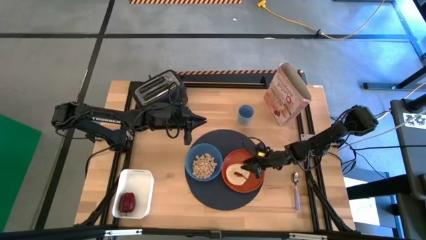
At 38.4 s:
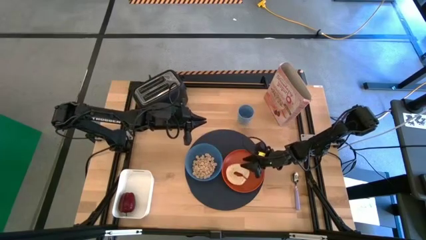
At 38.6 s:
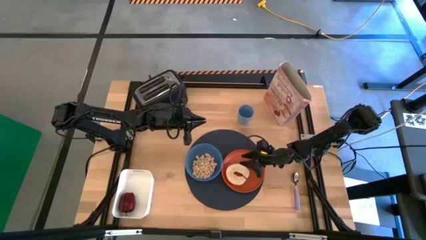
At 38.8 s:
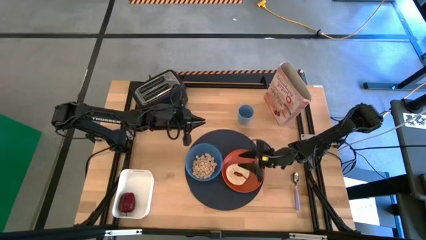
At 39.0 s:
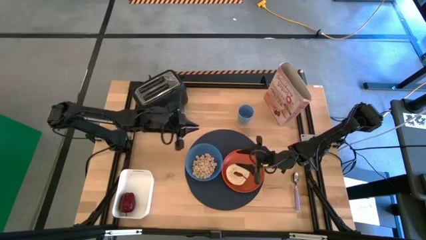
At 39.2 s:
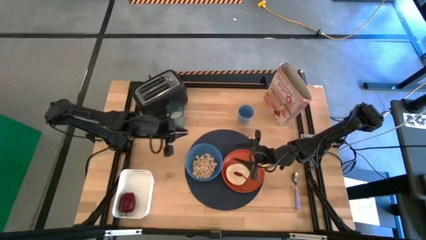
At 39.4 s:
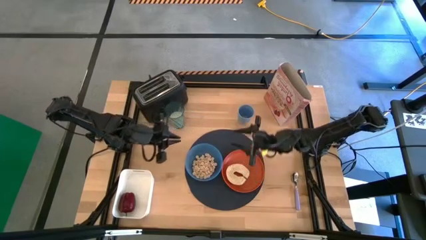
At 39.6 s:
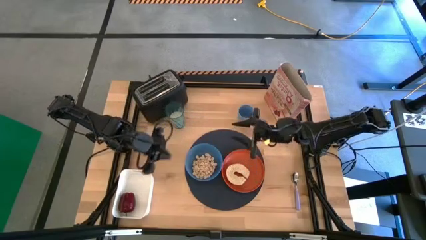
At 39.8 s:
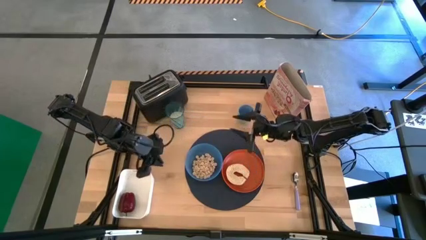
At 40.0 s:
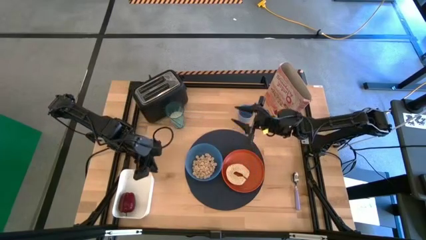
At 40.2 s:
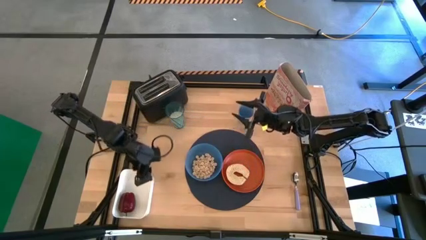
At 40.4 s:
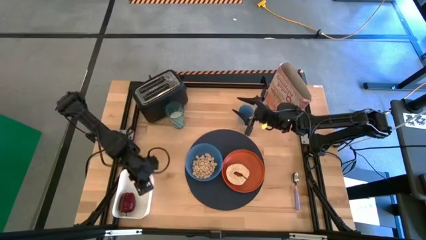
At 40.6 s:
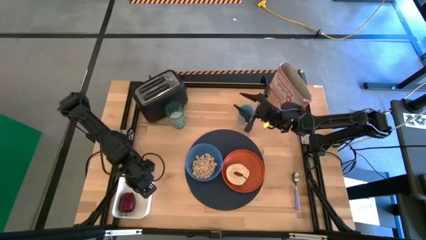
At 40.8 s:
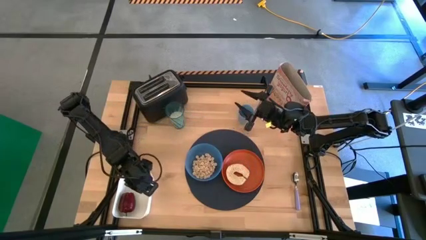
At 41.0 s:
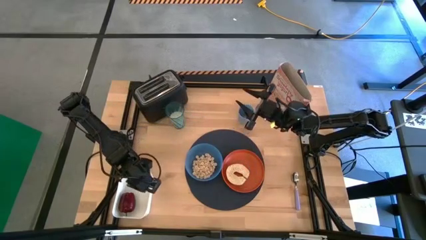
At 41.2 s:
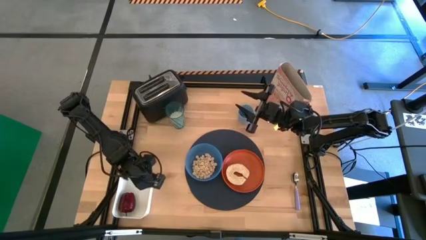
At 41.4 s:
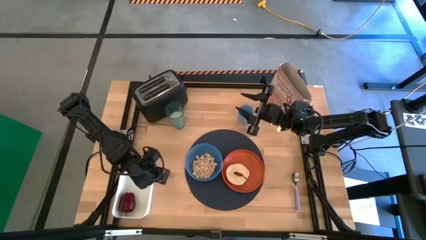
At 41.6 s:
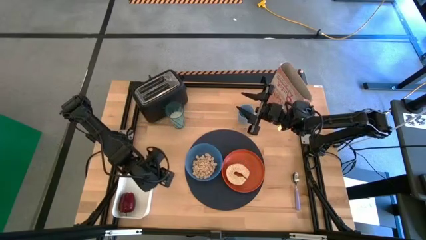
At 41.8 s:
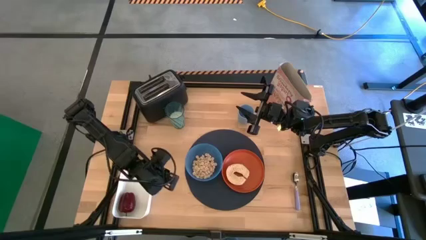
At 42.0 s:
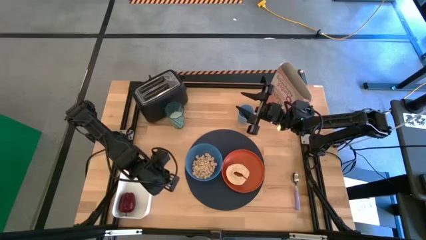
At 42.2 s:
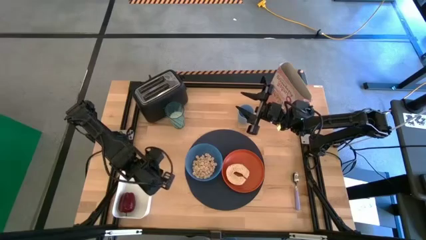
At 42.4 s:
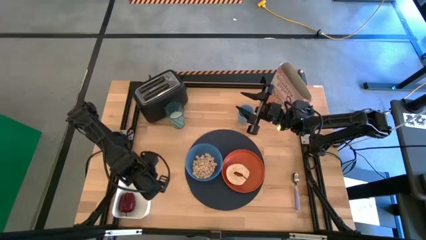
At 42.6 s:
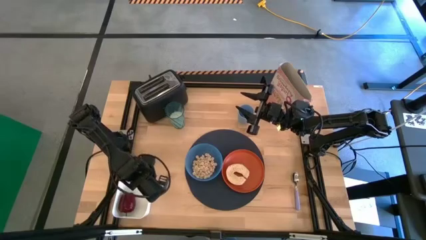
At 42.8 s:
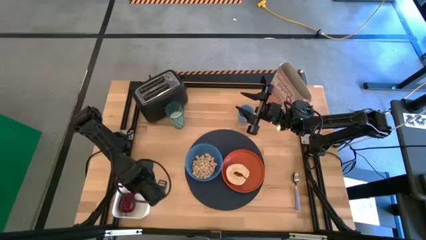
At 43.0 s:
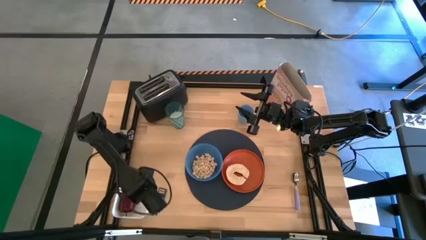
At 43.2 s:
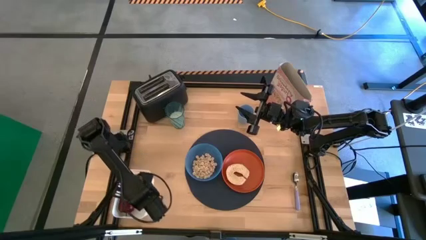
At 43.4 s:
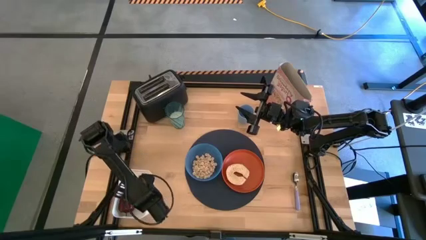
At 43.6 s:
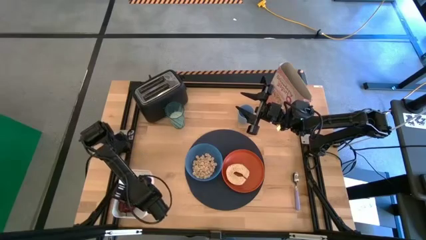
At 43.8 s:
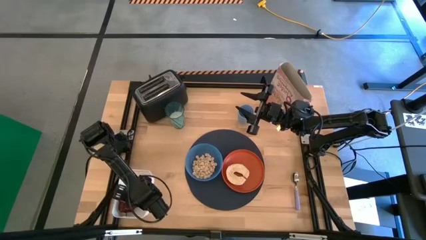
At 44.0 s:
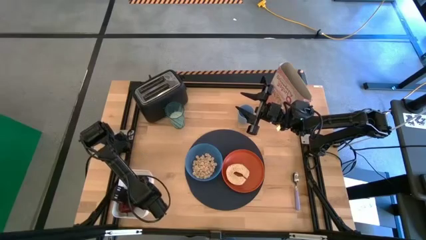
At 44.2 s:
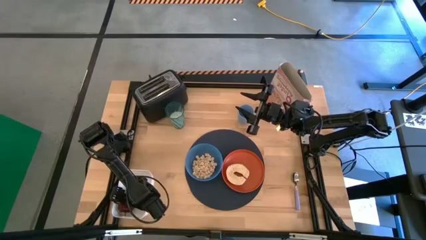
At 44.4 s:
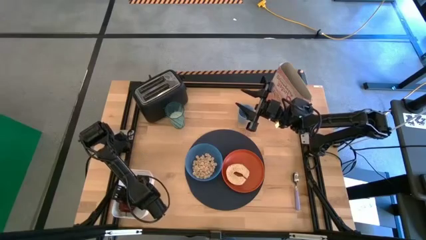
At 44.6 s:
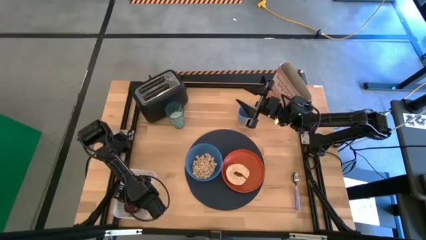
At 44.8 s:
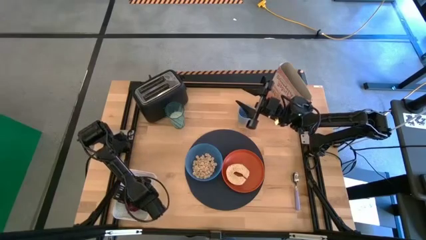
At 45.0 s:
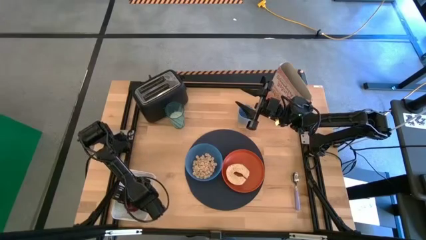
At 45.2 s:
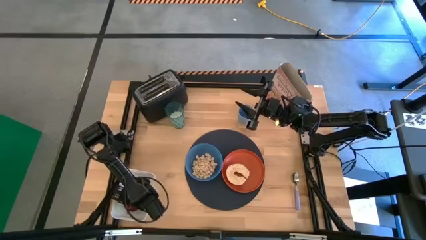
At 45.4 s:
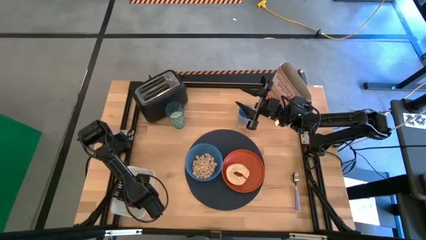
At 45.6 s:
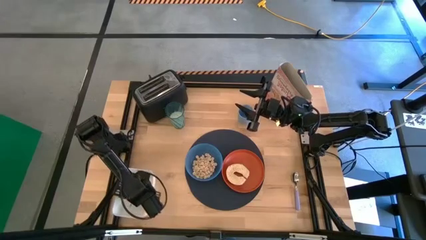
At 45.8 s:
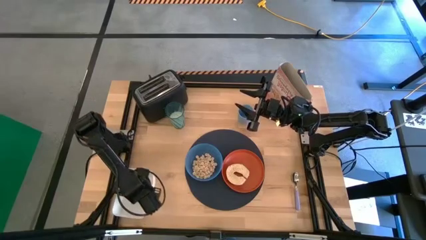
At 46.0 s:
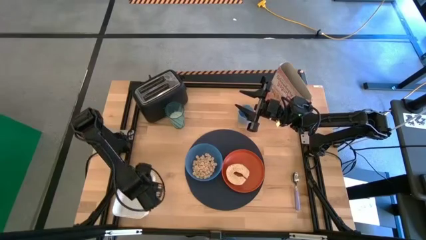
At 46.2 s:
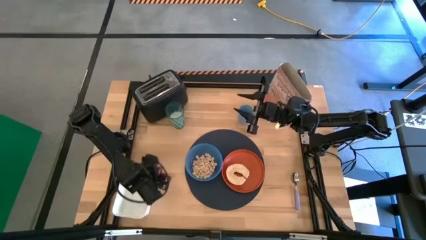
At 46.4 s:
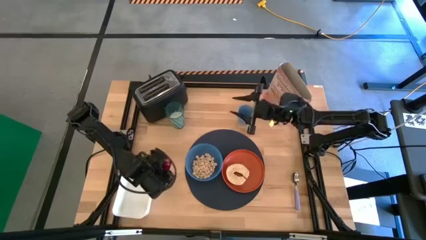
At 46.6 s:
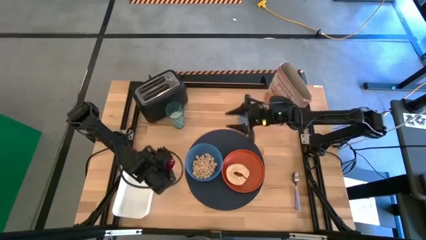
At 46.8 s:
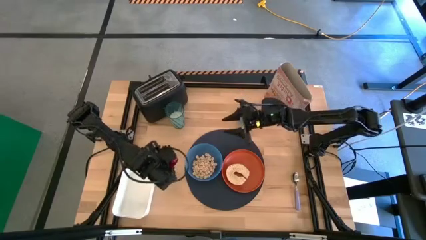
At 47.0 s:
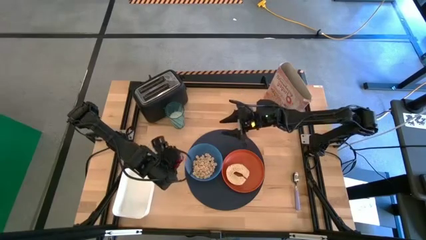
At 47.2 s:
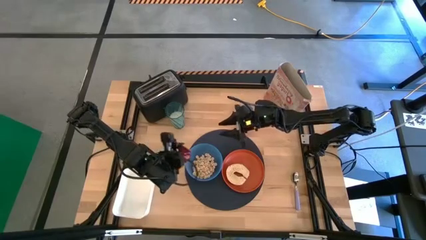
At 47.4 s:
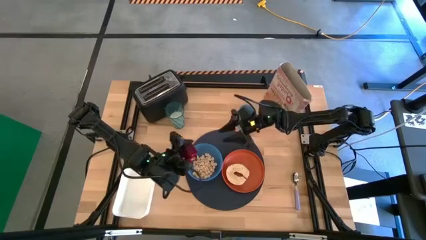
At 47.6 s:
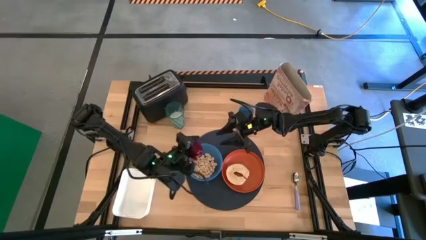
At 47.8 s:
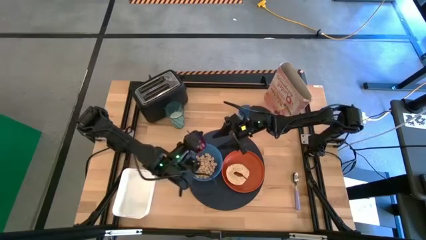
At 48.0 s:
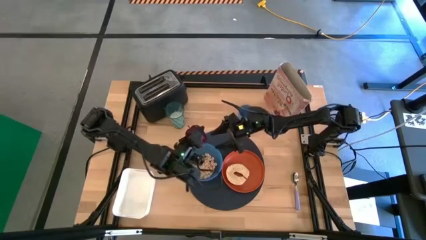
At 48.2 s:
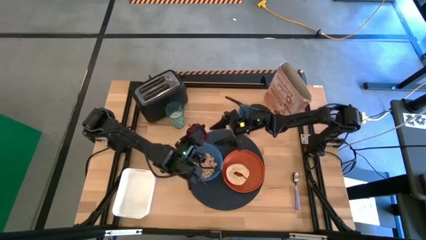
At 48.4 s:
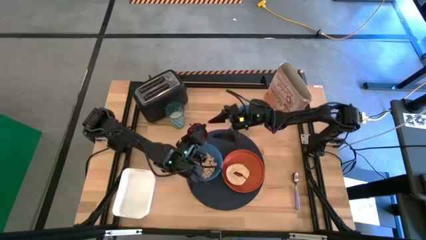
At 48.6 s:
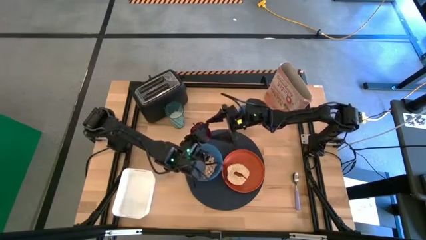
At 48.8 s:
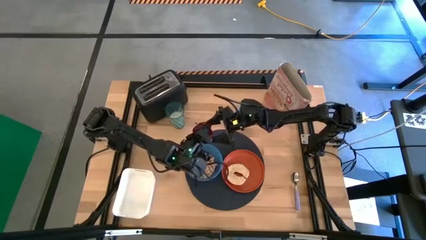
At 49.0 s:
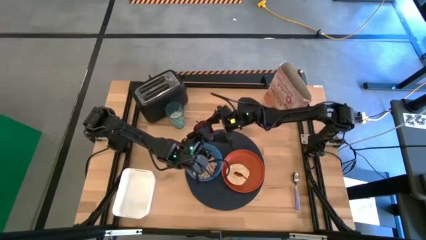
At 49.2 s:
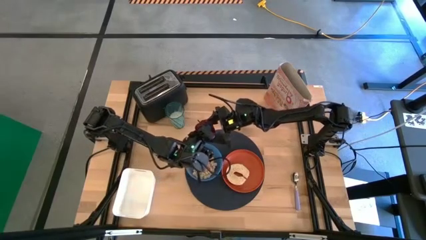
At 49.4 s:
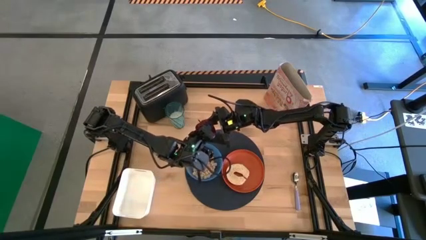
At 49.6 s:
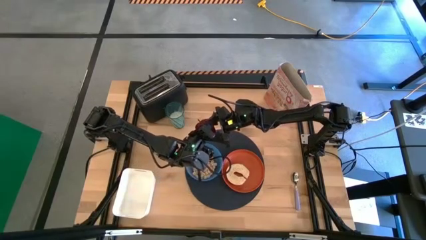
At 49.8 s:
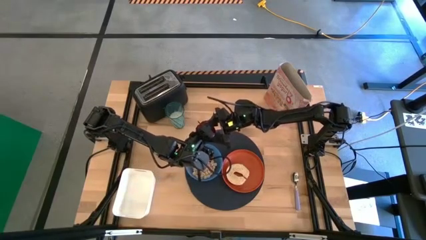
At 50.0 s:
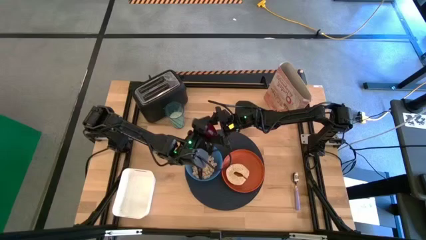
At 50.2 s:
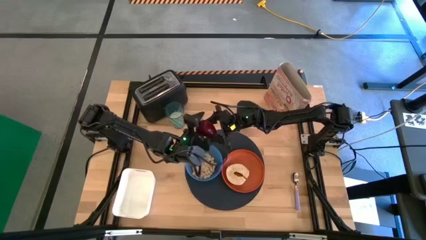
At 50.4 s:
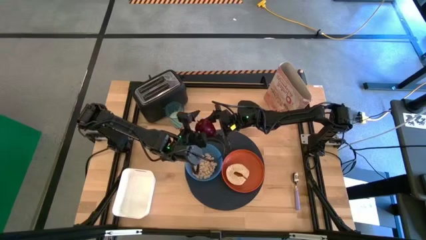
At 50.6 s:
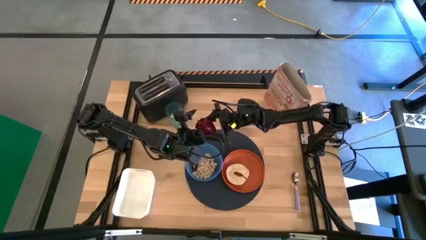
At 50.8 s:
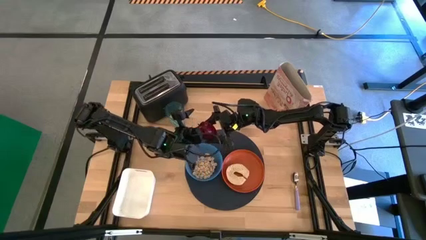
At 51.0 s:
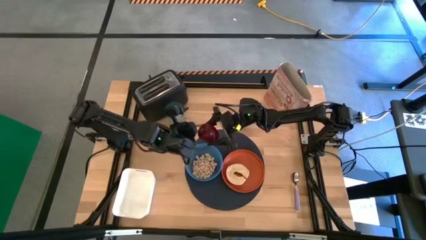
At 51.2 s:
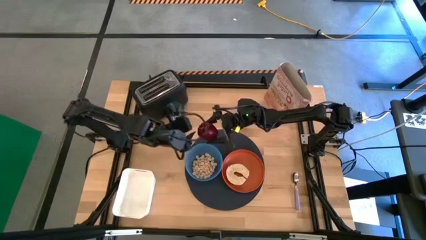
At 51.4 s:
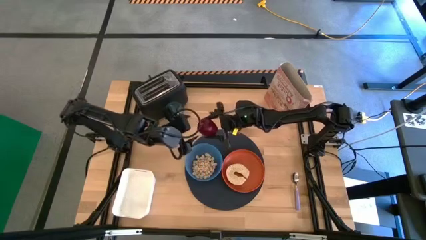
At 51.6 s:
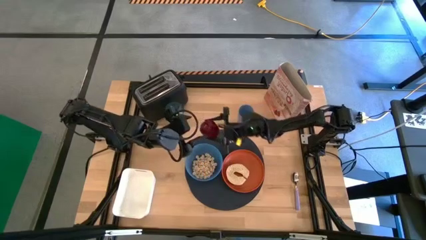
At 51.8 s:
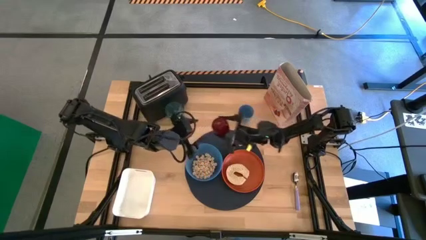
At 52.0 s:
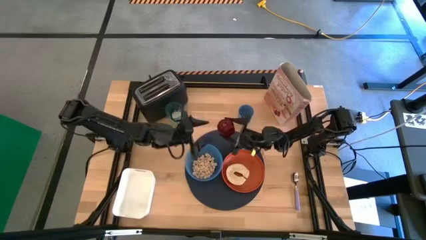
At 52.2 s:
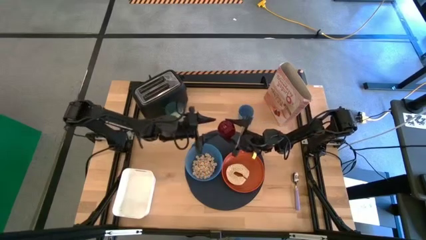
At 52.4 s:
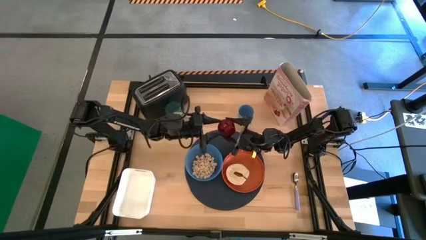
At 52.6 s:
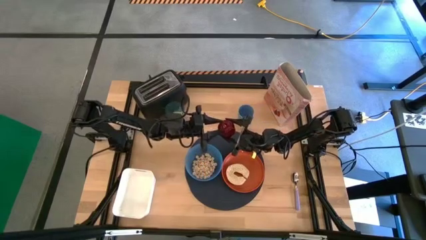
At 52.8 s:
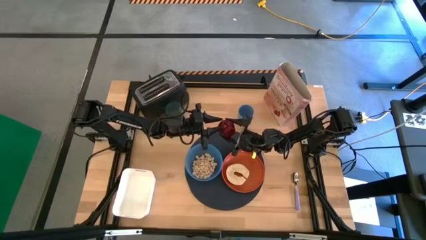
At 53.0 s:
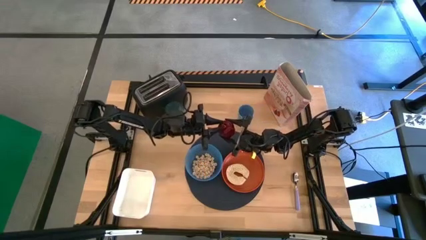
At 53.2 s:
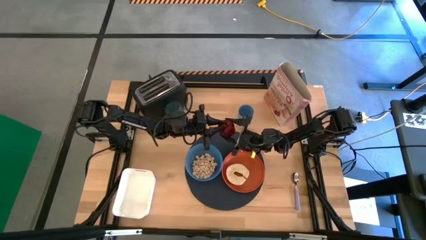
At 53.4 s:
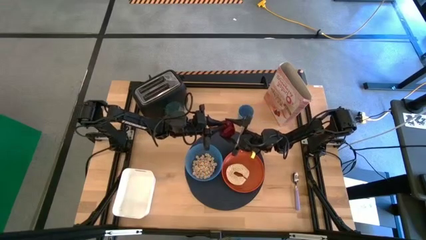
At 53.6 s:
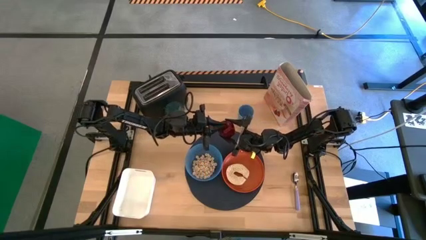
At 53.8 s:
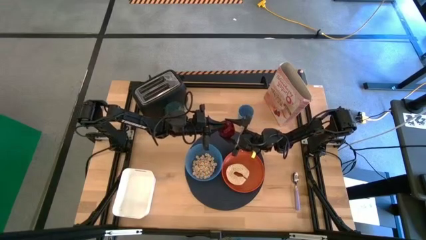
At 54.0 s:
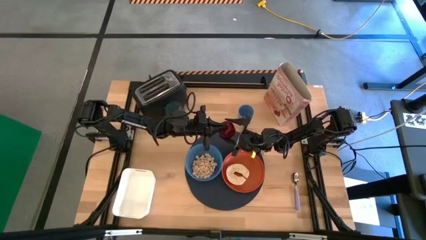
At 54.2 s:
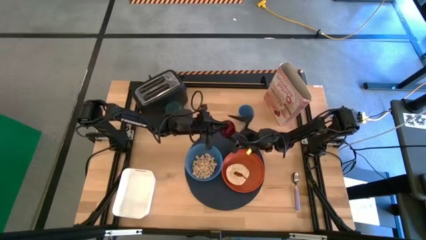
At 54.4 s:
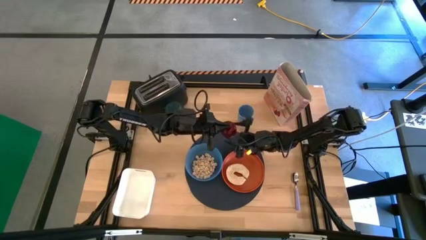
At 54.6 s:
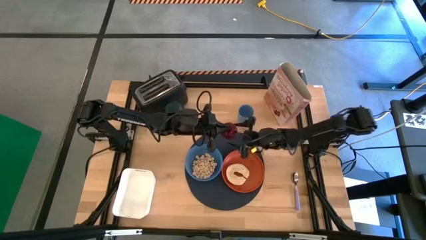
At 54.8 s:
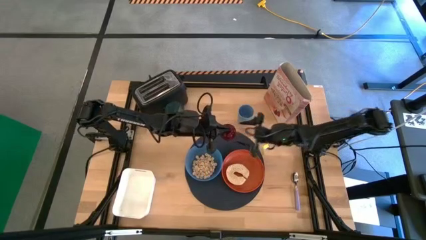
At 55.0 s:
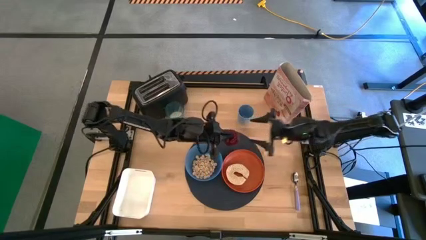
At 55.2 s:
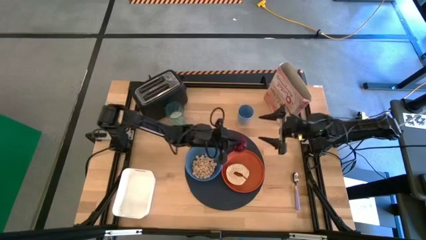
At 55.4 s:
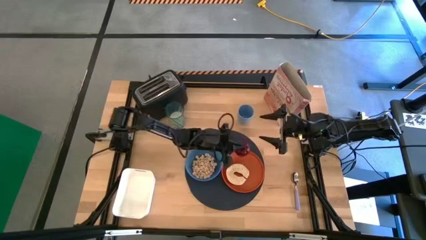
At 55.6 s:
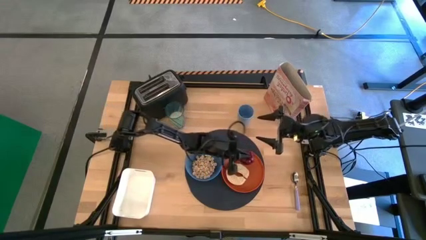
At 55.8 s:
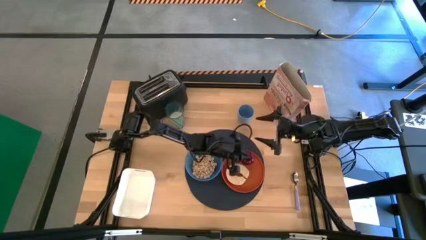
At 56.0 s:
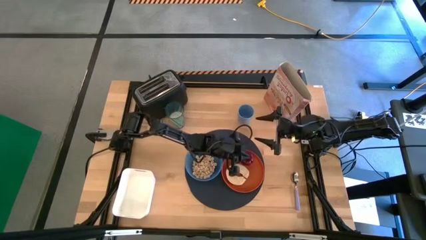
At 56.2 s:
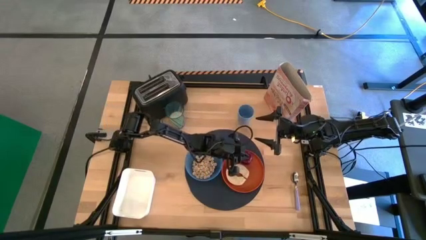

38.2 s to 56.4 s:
Task: Arrange a breakfast setting
Put the apple on the plate
